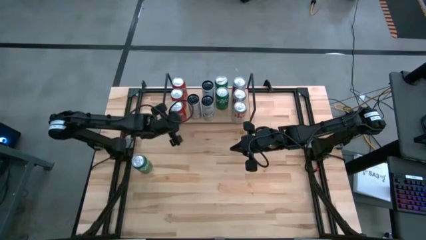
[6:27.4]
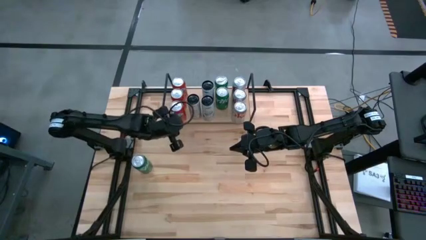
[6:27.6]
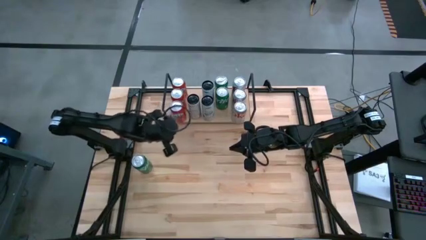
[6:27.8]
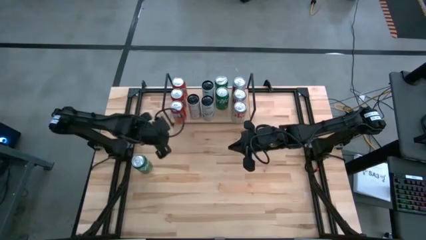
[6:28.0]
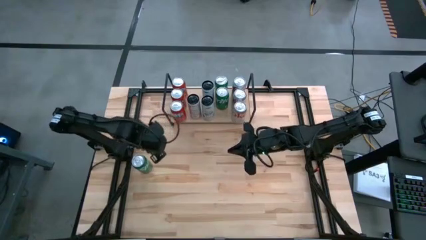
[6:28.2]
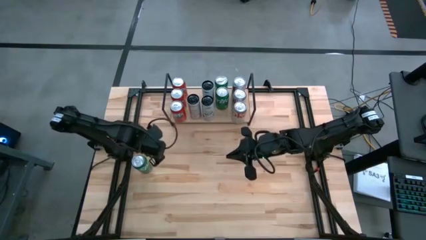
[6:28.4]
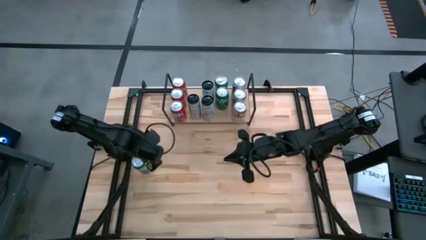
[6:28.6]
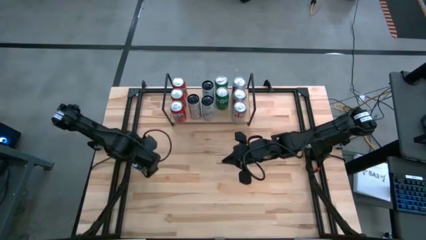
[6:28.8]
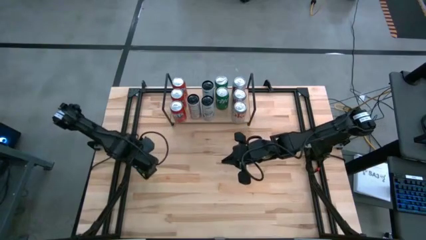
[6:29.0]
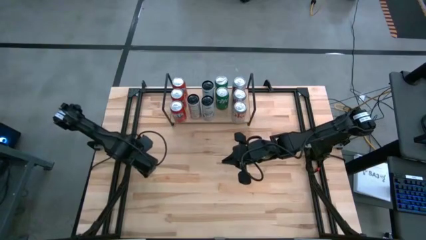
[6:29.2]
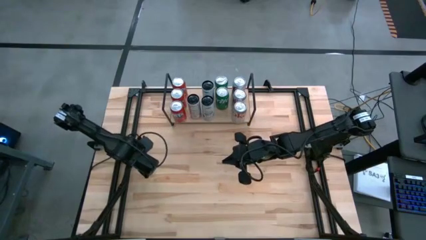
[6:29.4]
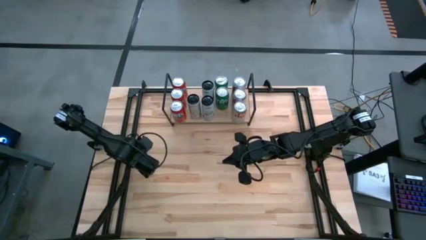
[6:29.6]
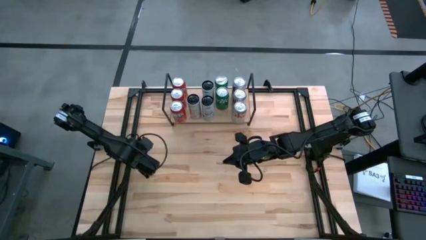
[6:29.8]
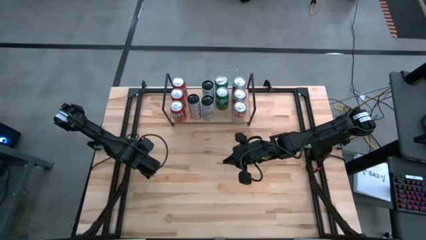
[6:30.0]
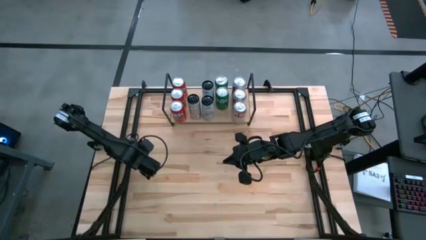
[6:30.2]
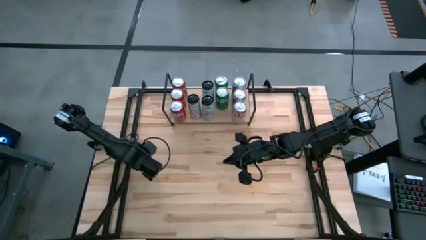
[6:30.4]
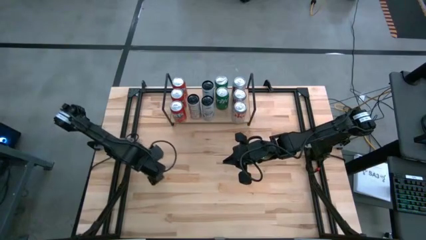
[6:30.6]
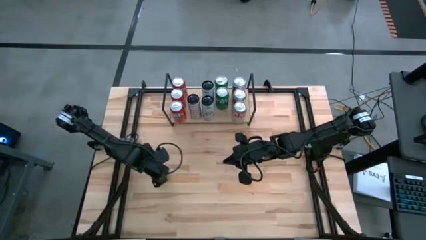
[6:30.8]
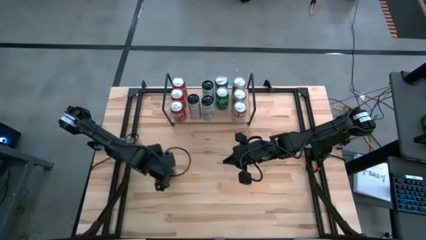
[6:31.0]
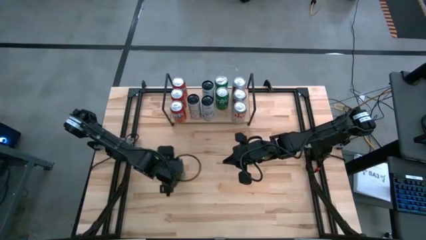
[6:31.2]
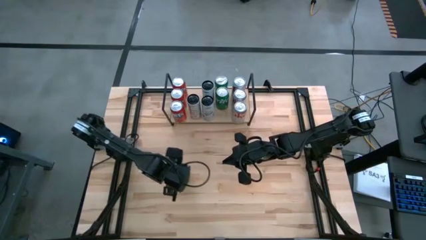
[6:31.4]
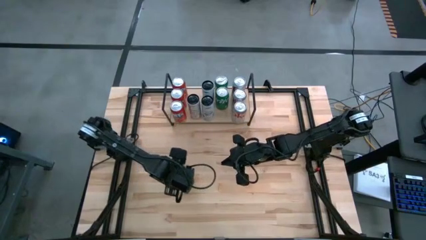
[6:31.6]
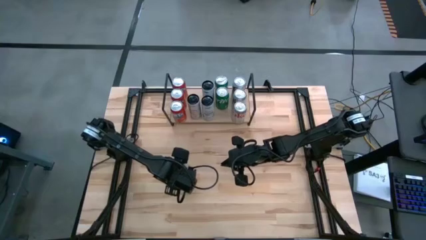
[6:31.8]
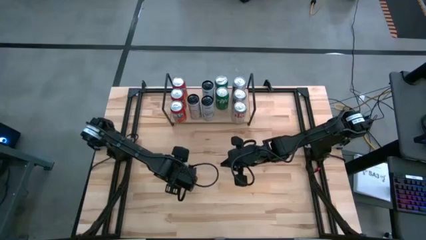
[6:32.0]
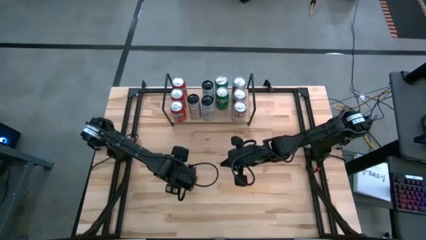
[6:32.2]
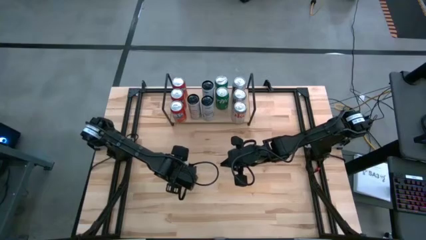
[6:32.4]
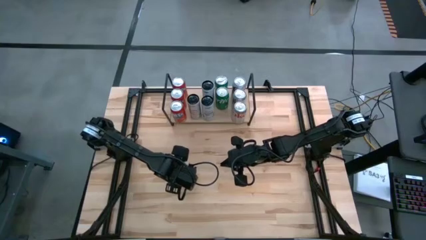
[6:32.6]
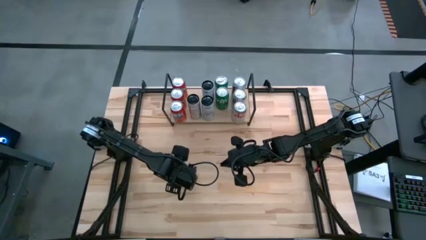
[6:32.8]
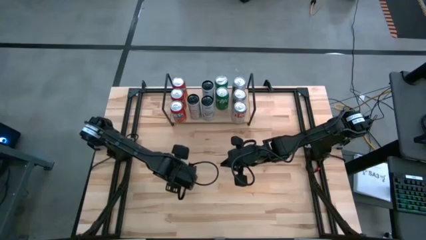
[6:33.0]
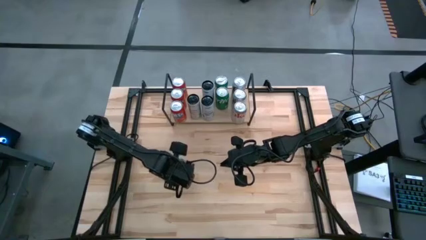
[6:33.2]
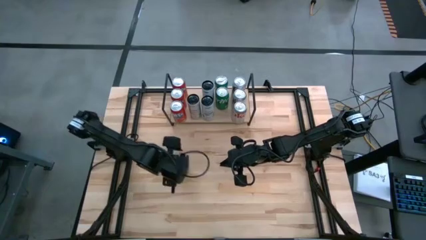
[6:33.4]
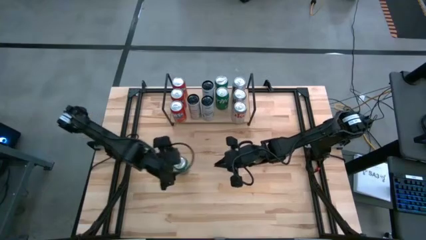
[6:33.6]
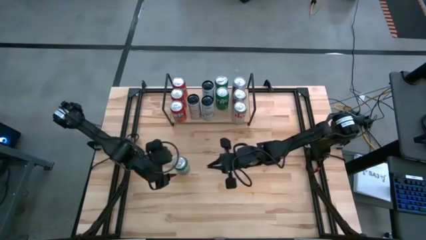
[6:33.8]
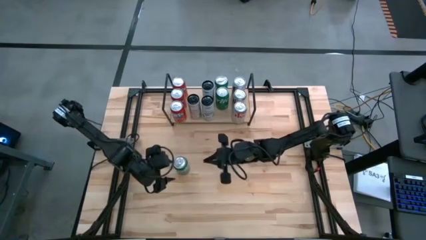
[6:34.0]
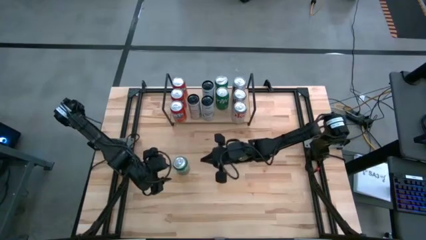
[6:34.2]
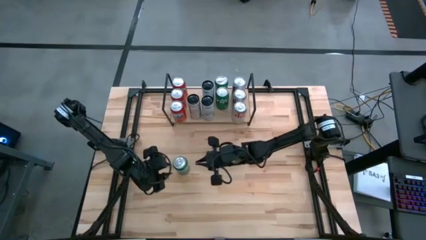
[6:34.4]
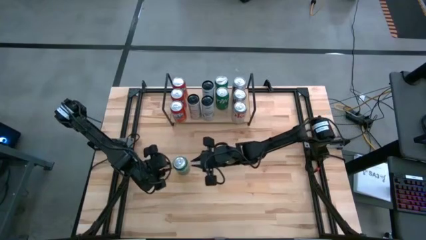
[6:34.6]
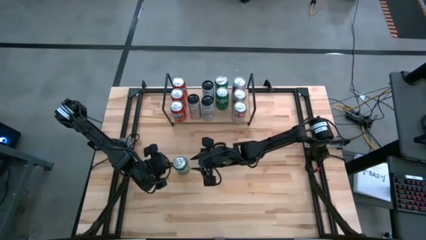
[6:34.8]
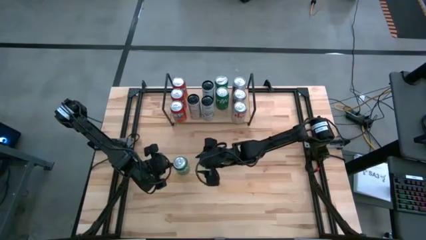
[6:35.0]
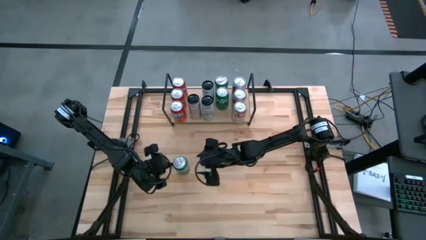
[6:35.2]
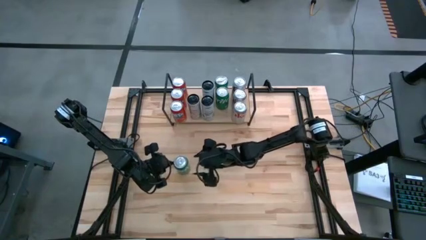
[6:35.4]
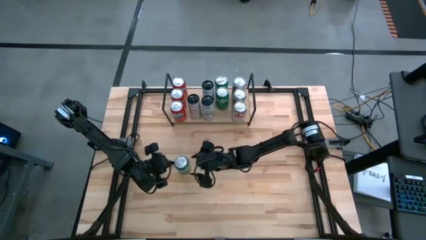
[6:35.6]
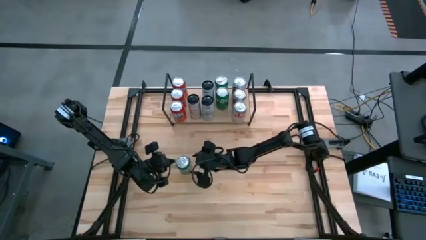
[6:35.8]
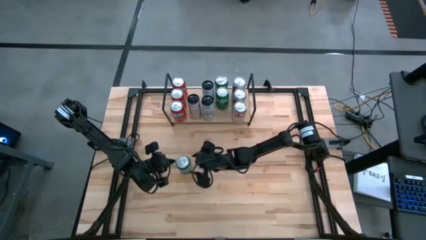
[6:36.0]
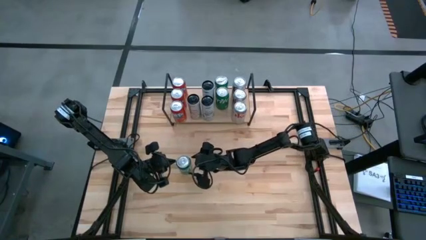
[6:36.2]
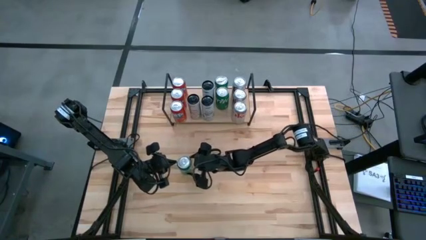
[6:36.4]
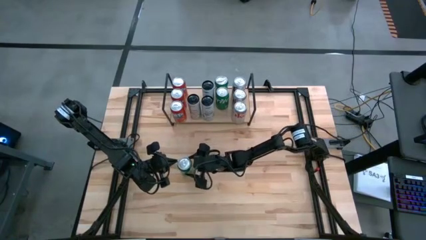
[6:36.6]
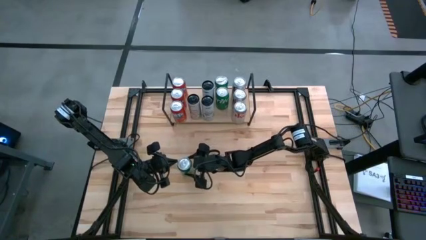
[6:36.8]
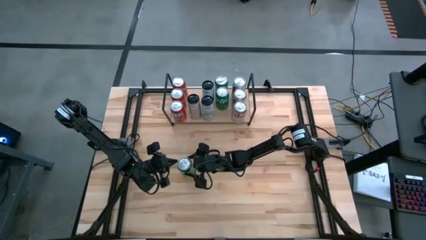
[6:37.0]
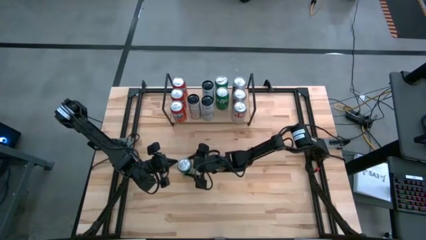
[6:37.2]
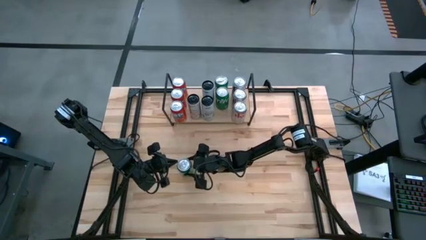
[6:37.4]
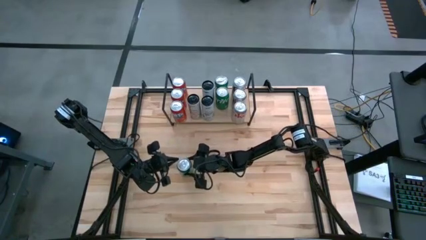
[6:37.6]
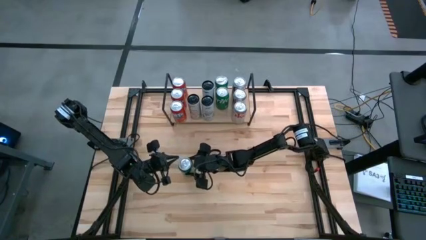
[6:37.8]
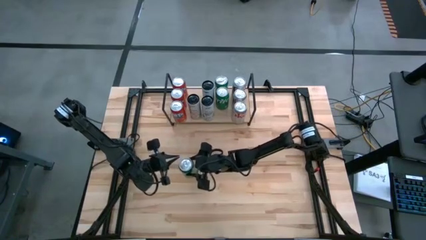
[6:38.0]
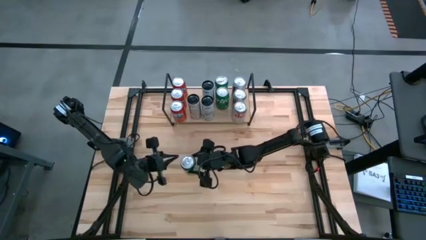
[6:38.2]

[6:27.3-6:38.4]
Task: Sort soda cans
Put the green soda can on the shelf and align it with the other green soda cans

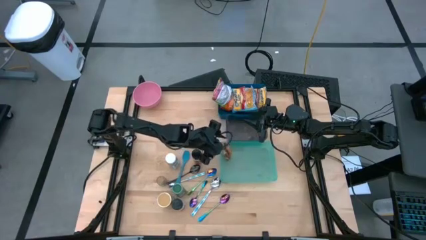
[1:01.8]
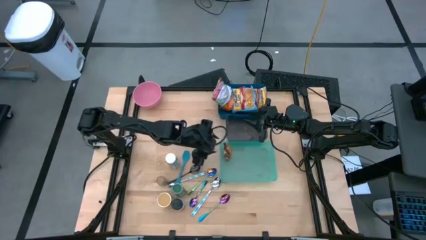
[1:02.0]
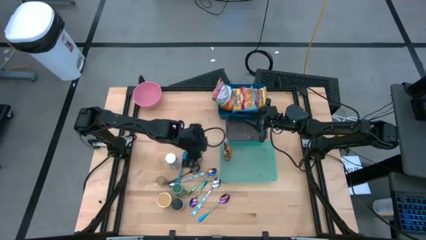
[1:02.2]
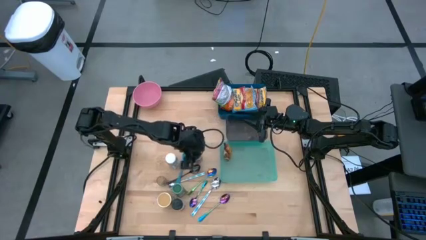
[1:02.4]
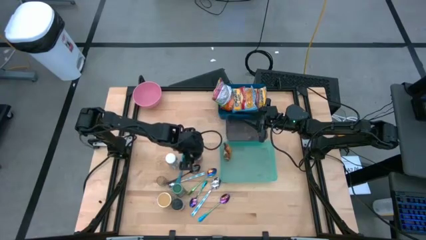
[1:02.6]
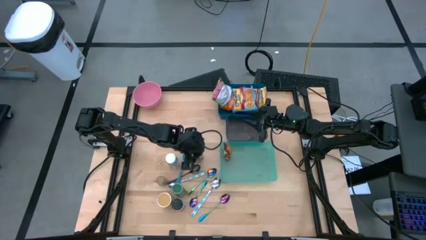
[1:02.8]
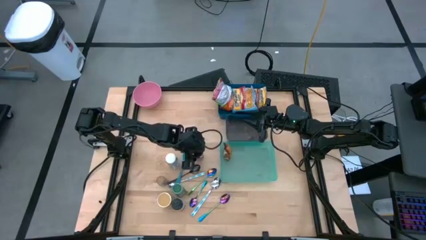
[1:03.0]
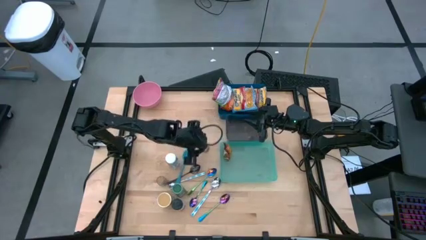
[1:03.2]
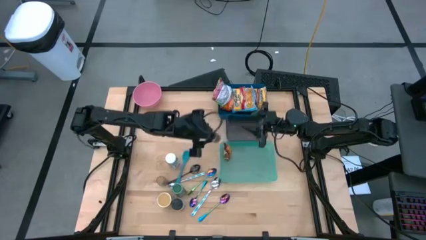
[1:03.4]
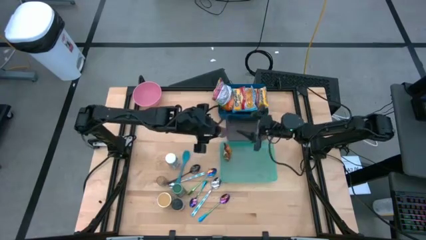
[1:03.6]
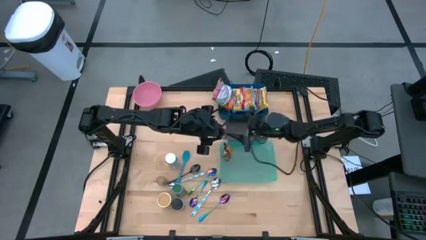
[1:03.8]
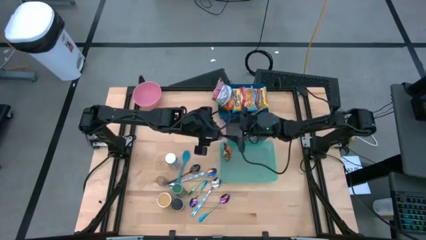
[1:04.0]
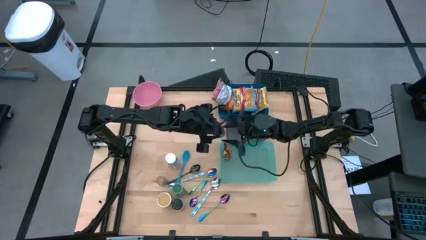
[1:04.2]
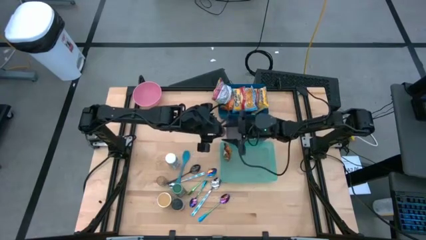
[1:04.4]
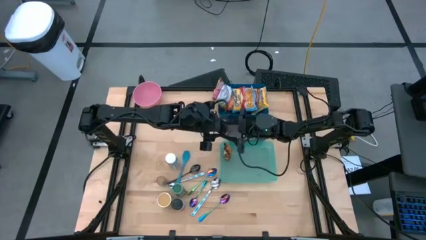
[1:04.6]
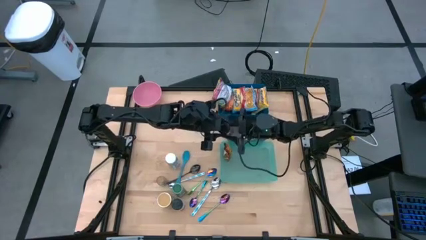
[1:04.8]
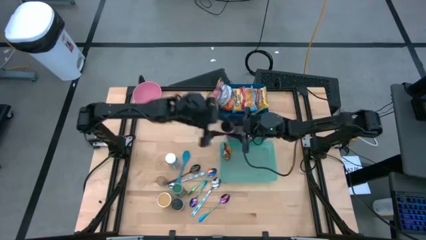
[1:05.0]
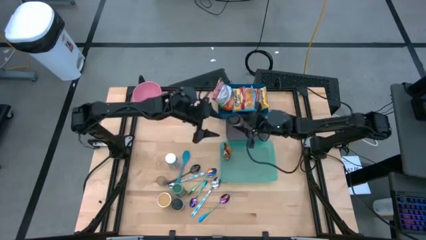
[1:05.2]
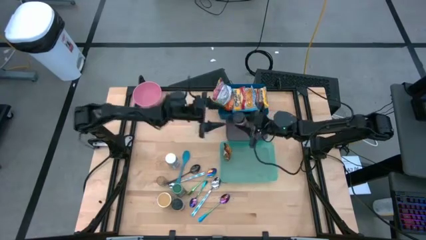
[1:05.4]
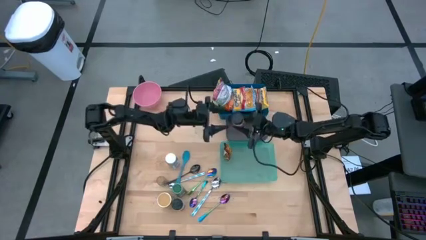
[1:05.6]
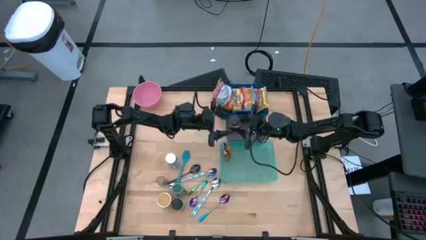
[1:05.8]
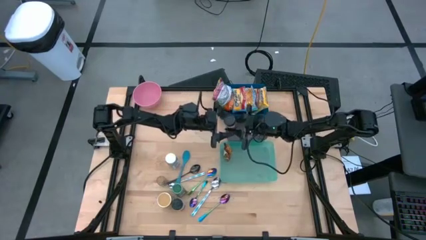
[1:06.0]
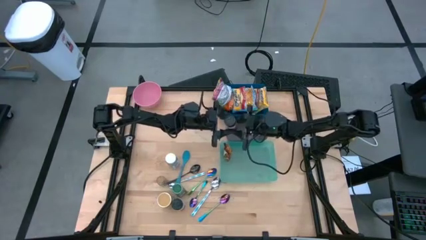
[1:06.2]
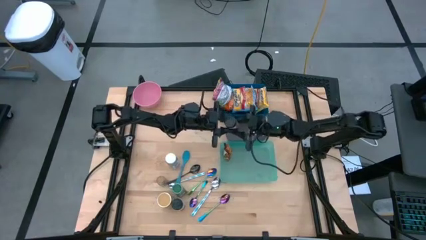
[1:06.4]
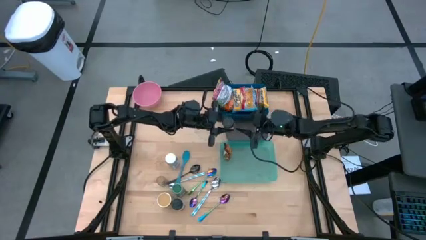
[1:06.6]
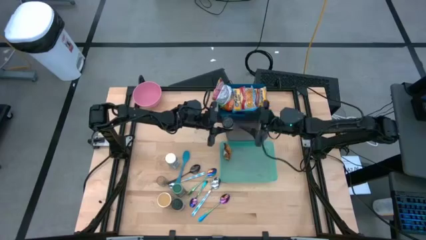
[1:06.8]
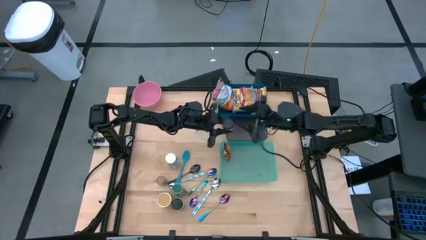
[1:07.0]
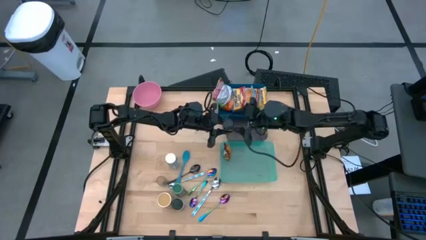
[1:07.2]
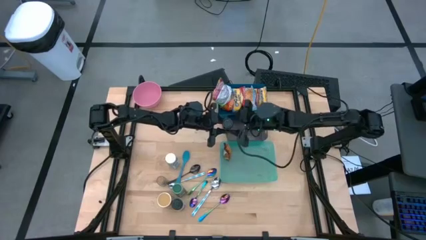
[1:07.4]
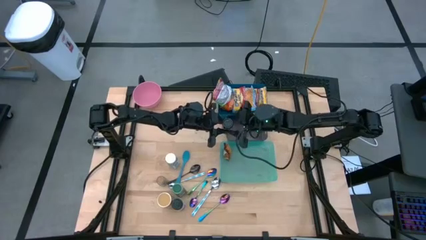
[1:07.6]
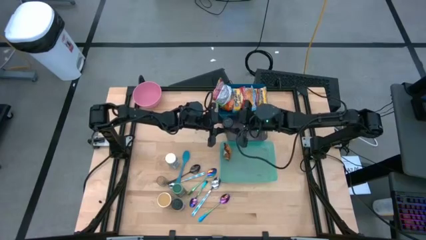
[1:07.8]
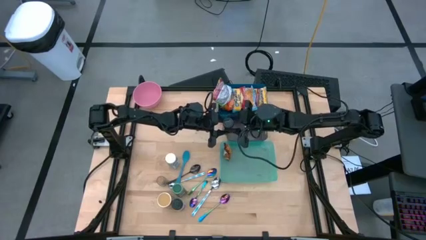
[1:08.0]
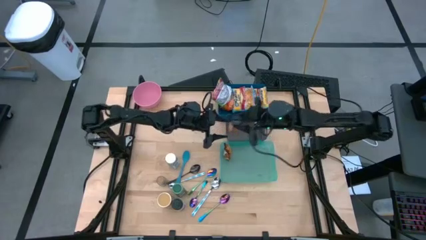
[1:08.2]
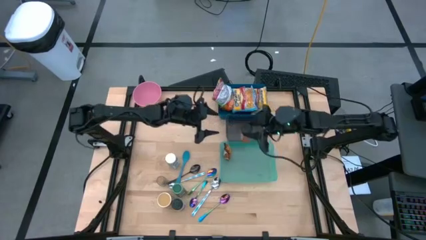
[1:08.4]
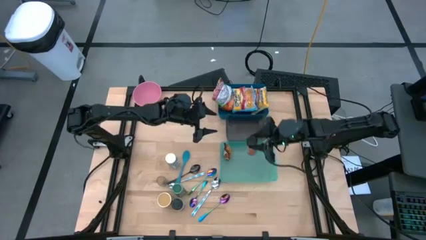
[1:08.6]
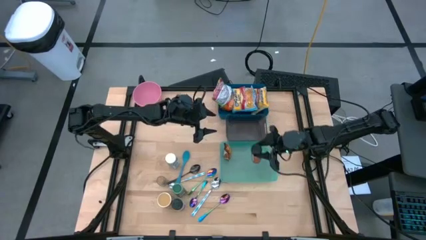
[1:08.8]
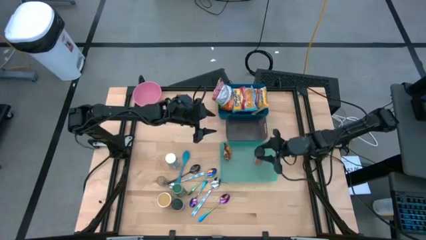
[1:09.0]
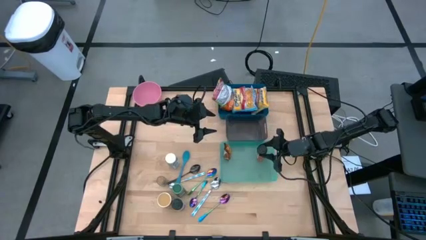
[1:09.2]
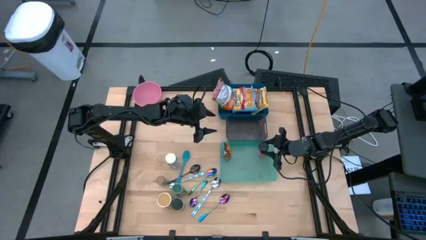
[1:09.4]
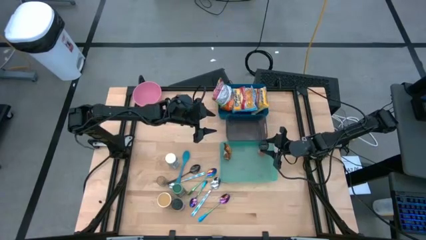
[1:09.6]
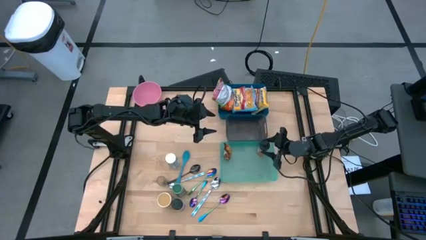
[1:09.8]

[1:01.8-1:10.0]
Task: Pick & Place Food Item
Put the orange seasoning bottle into the green bin
